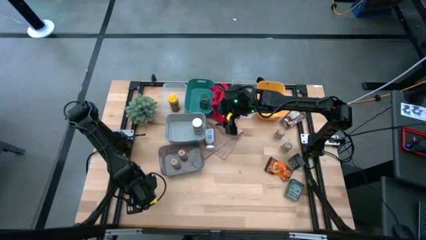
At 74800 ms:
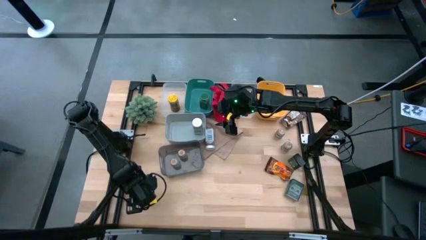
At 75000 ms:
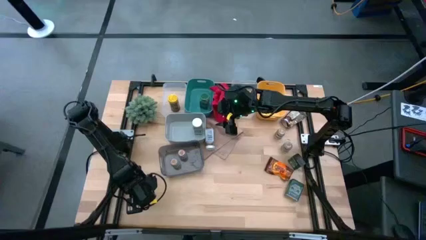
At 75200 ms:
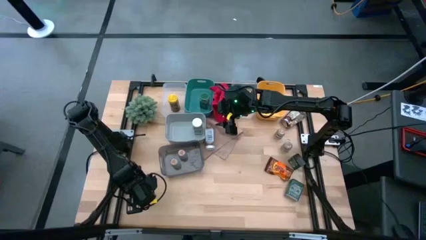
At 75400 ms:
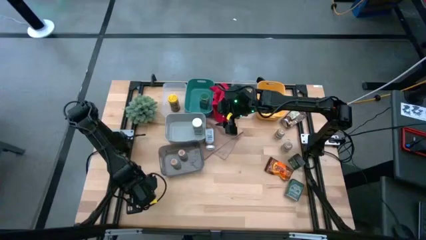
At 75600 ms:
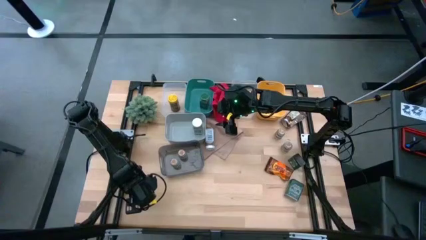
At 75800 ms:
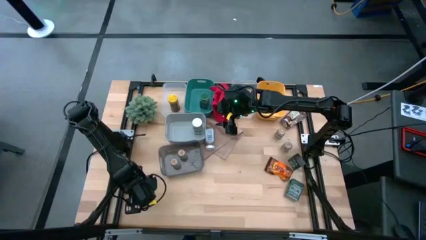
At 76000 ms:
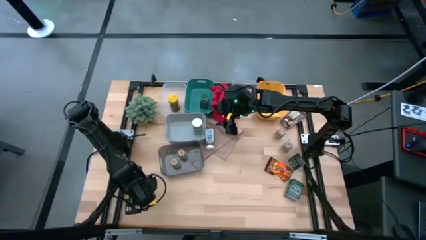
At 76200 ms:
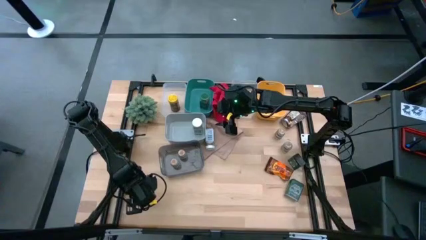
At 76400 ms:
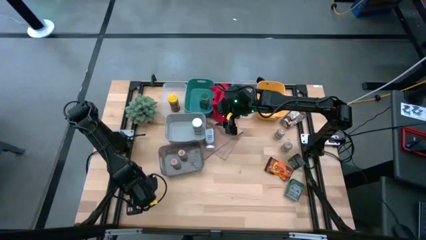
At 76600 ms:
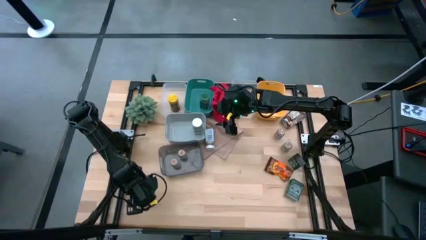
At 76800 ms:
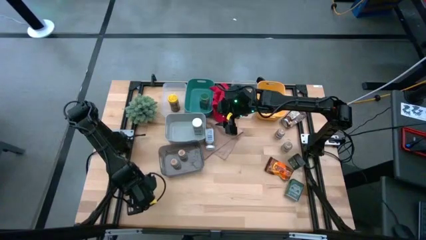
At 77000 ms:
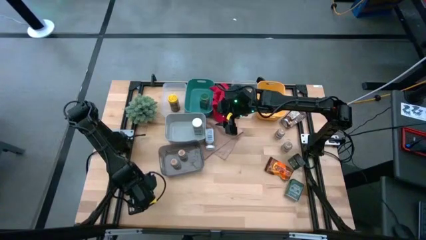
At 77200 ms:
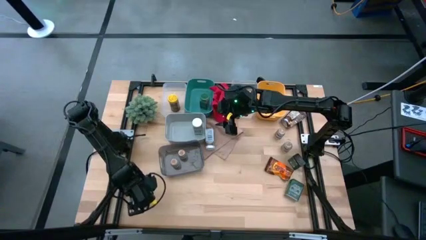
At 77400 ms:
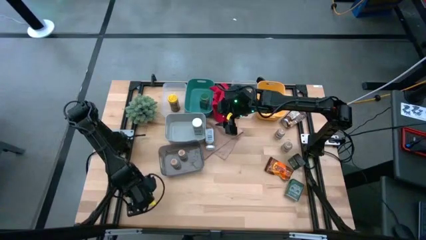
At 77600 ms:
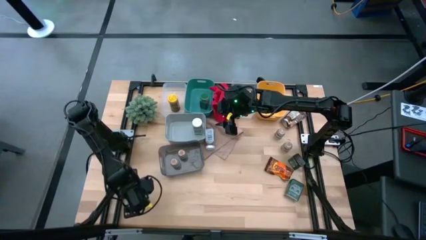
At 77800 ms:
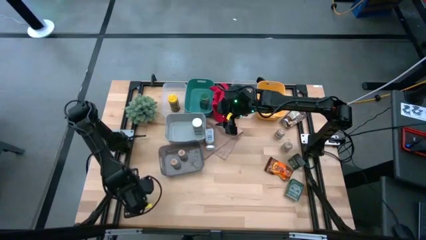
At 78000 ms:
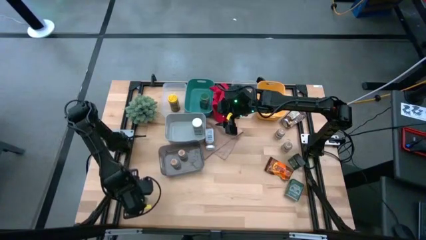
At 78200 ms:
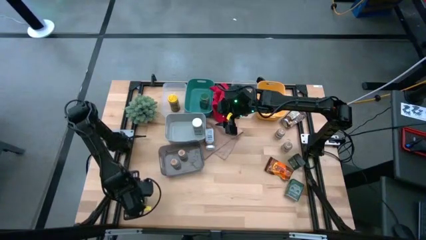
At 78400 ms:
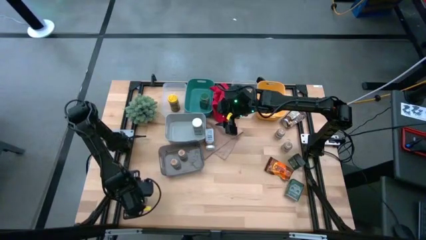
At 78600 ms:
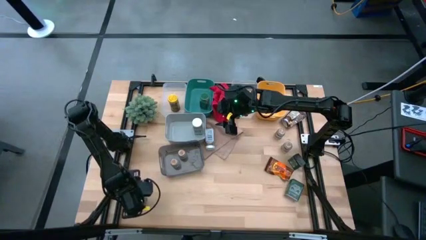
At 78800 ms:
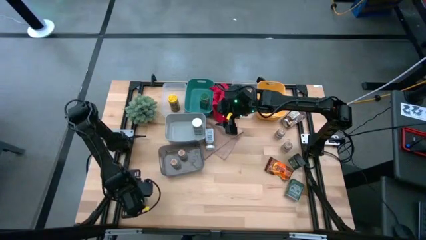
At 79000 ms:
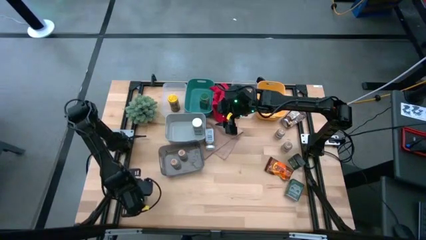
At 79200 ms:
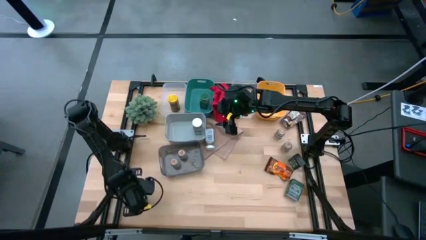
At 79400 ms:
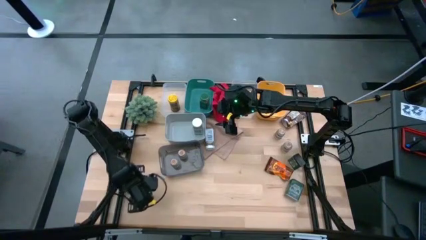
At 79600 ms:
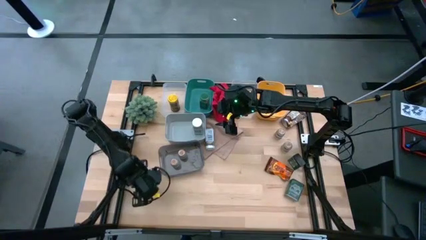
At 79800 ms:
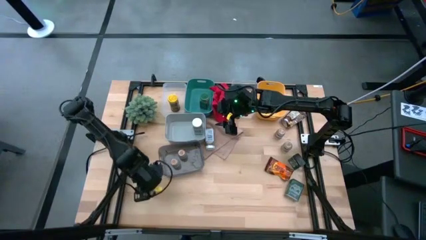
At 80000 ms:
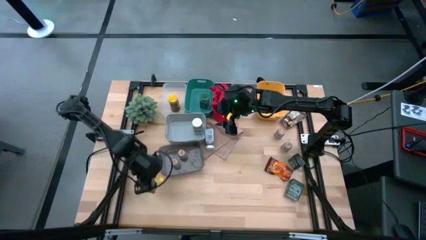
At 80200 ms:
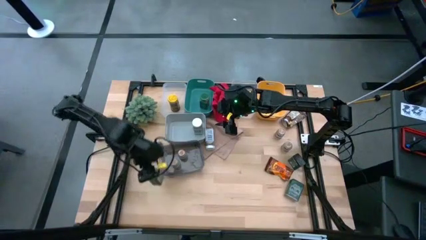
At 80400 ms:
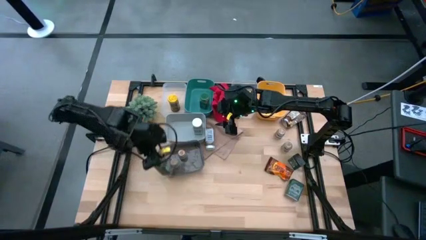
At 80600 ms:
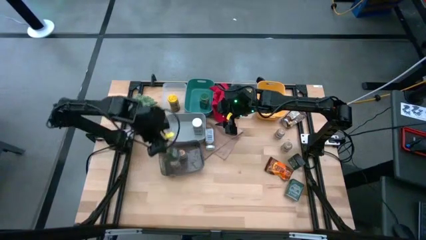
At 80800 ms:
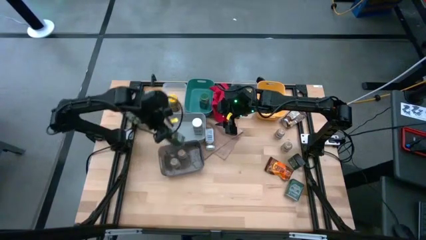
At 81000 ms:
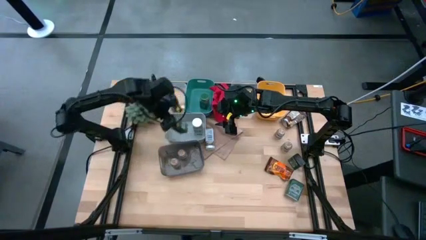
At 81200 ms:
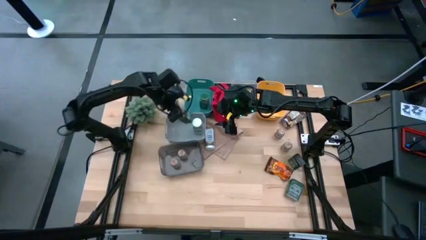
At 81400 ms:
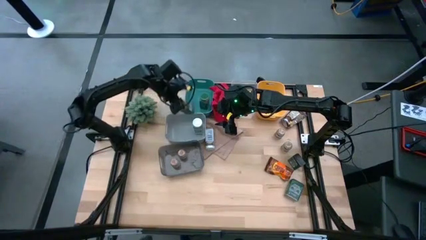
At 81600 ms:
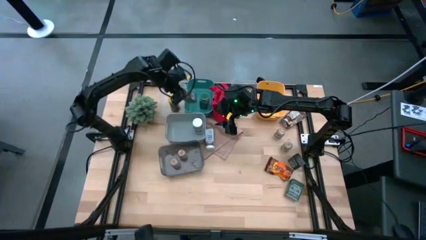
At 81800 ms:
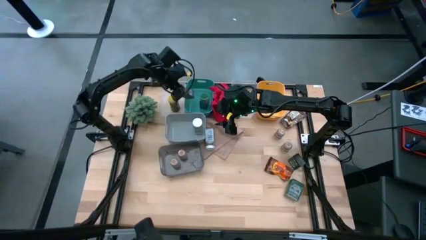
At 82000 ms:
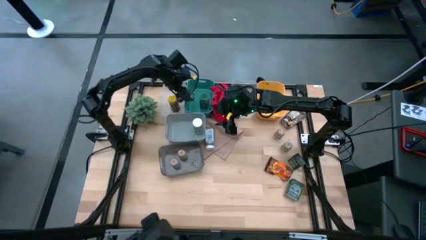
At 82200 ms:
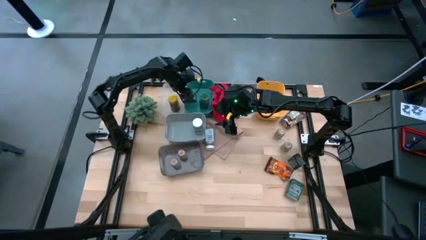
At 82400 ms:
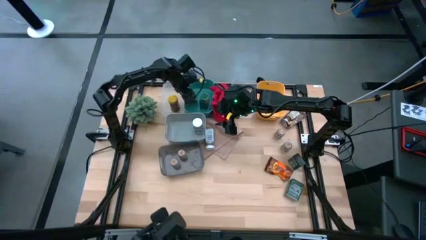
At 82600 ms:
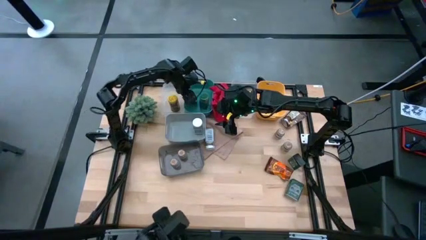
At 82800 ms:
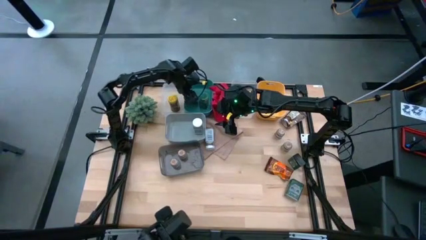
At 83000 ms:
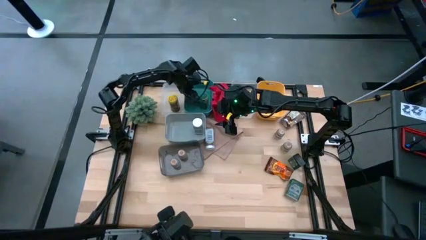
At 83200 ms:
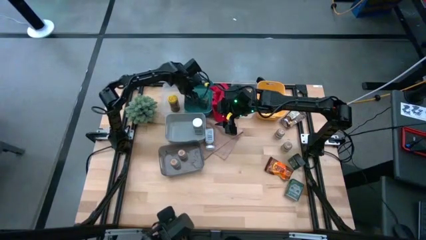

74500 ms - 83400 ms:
Task: Sort spices by type
Put the green seasoning bottle into the green bin

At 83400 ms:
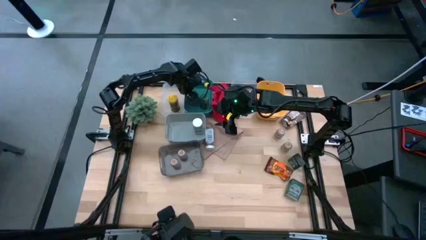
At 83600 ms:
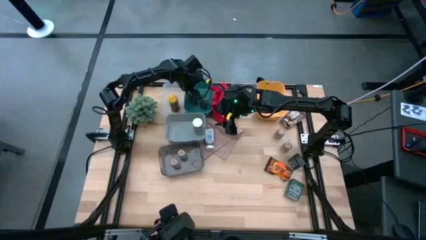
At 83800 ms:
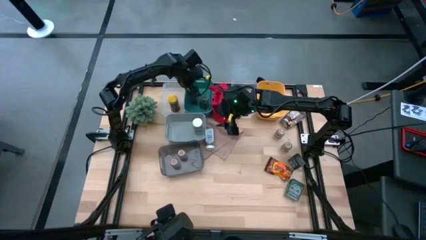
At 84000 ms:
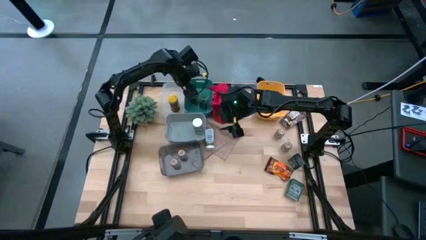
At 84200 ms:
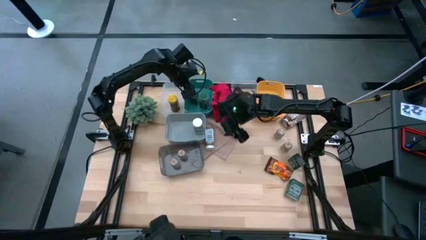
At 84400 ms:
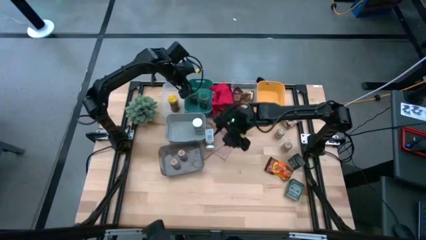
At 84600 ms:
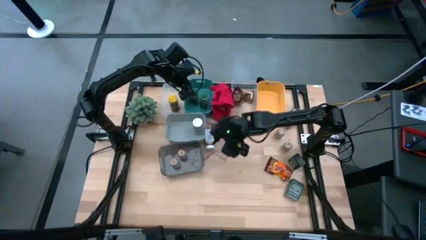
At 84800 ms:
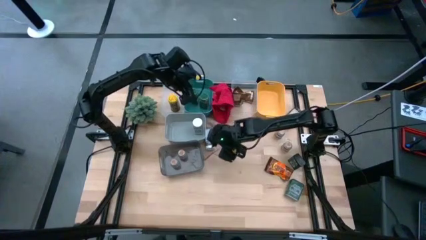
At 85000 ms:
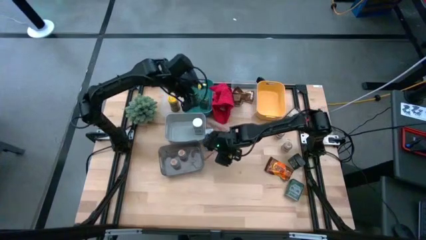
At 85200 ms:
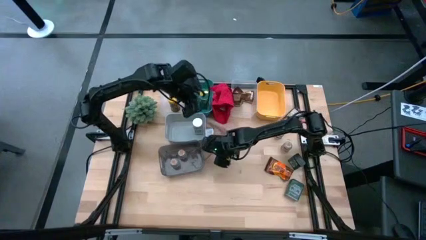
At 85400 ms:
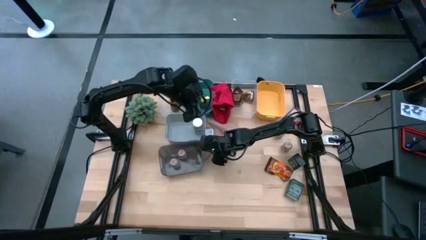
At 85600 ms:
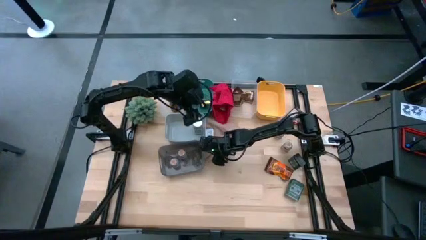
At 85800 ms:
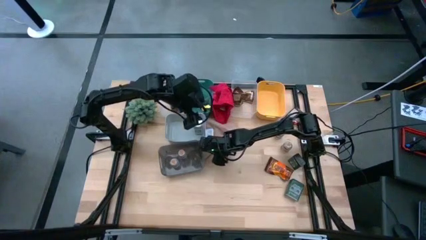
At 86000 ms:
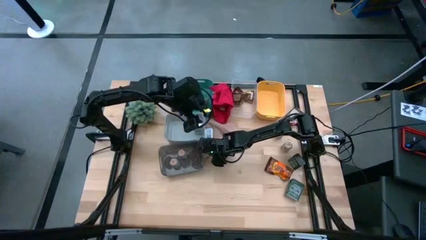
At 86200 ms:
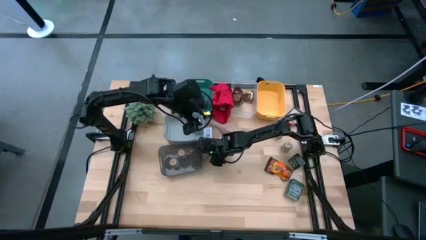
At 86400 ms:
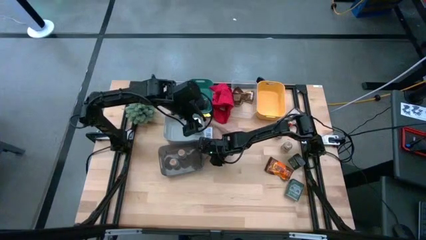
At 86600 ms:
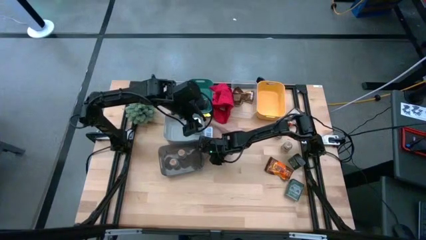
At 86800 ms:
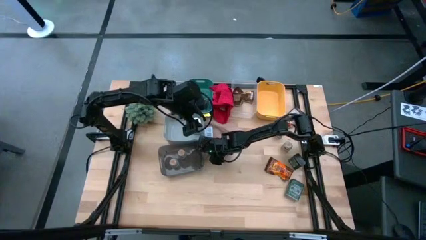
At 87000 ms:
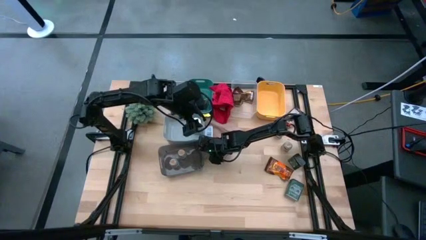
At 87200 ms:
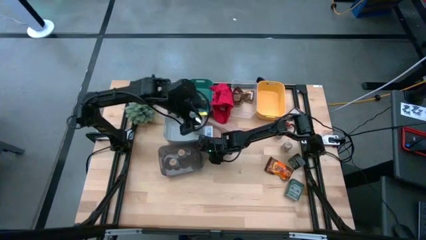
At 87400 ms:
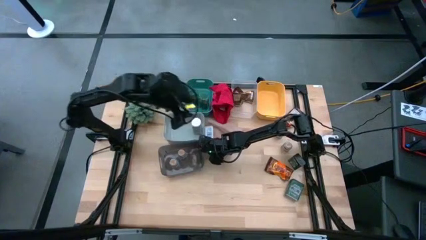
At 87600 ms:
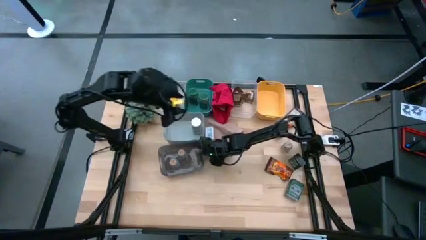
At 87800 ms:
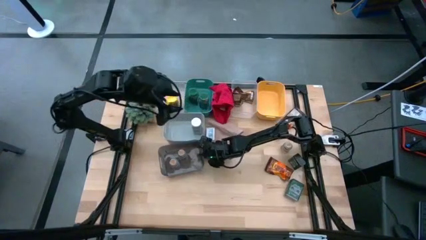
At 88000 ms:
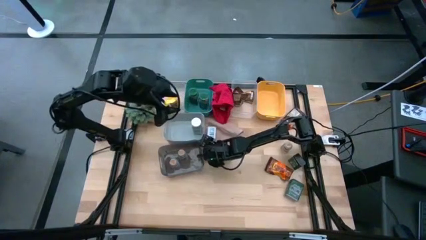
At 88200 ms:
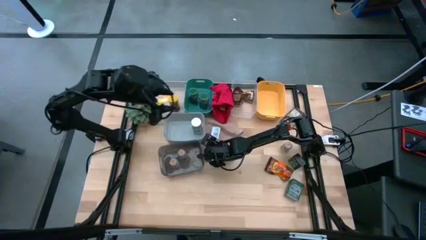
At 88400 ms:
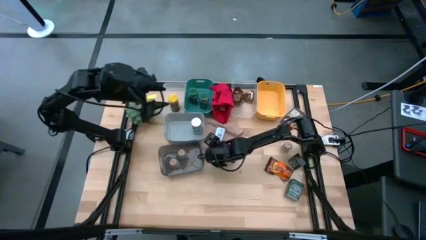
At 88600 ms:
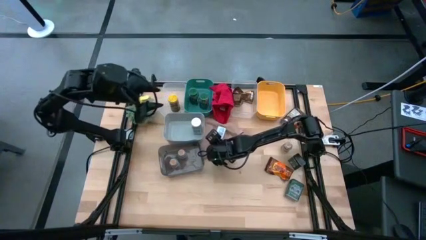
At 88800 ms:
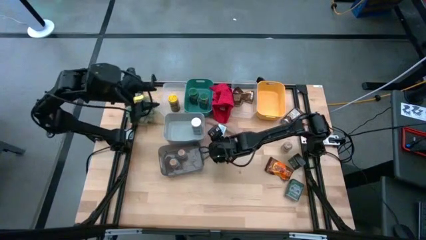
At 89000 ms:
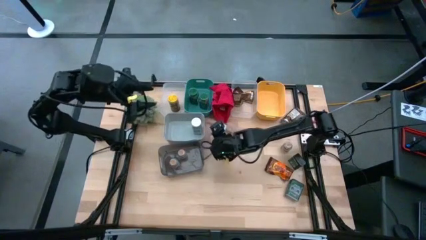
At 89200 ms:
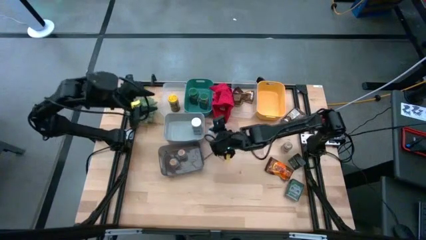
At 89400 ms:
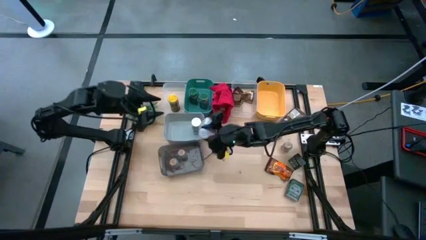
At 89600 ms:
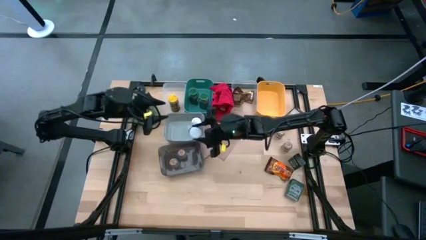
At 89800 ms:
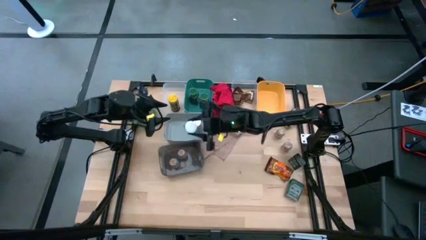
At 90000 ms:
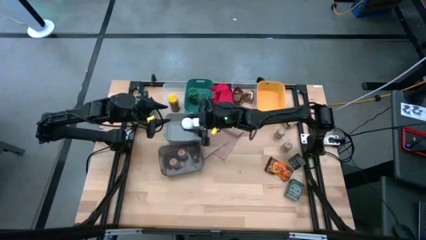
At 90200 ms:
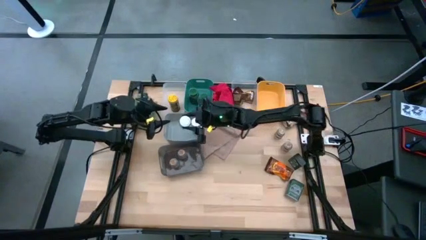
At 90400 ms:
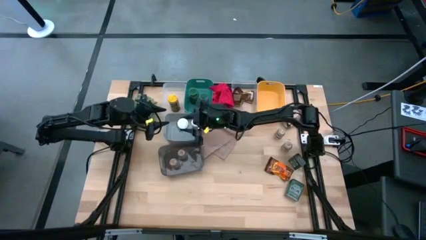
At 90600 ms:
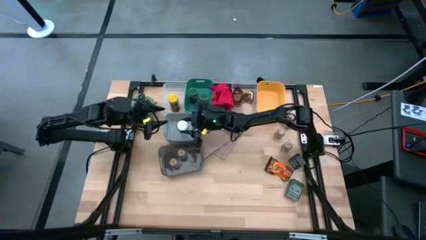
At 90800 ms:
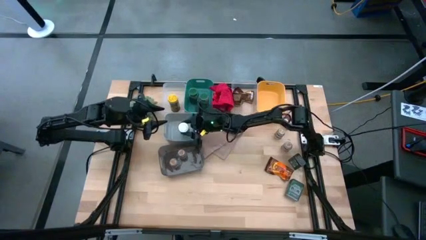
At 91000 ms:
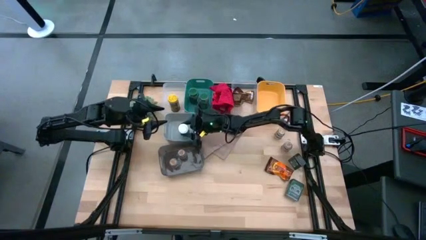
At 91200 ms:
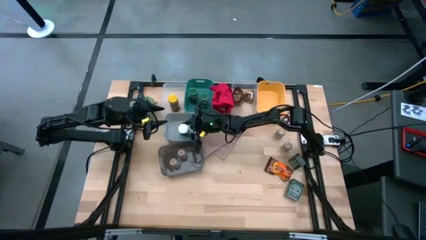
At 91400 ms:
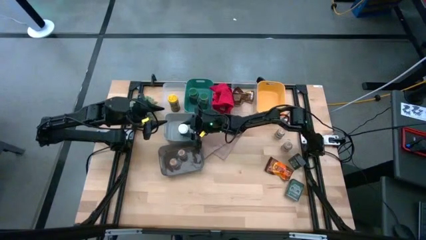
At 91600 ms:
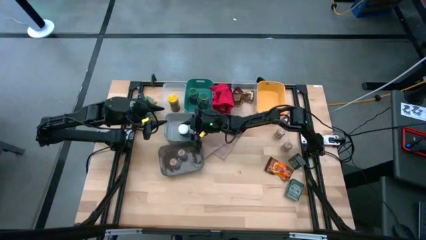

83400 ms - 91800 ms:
Put the white seasoning bottle into the gray bin
